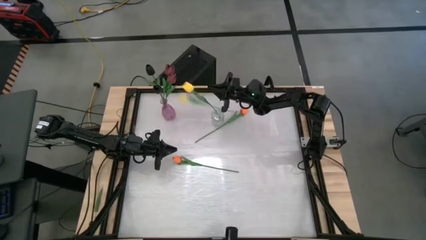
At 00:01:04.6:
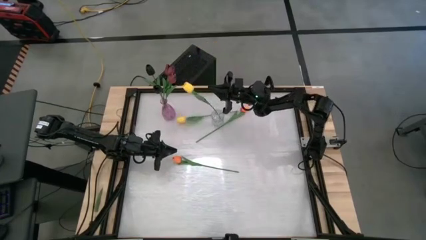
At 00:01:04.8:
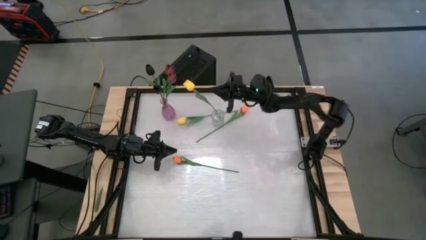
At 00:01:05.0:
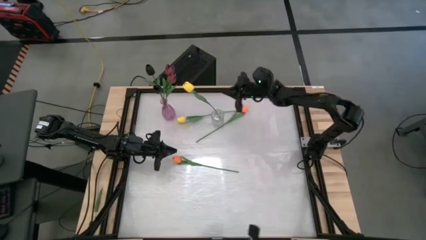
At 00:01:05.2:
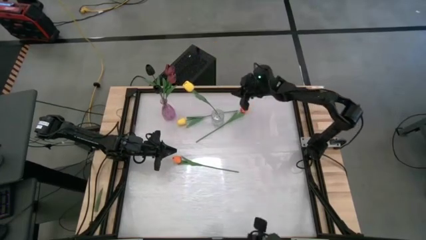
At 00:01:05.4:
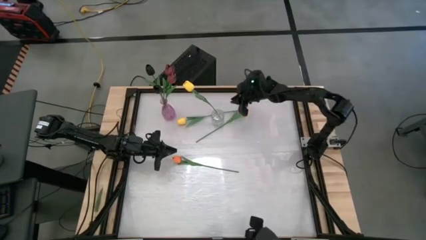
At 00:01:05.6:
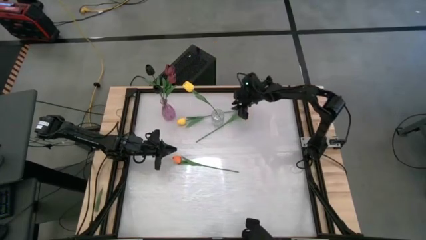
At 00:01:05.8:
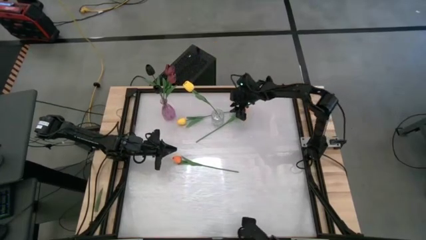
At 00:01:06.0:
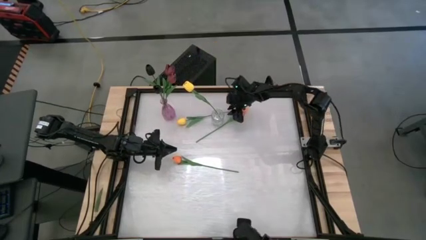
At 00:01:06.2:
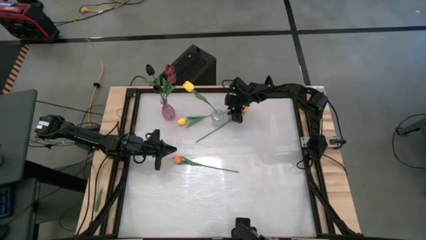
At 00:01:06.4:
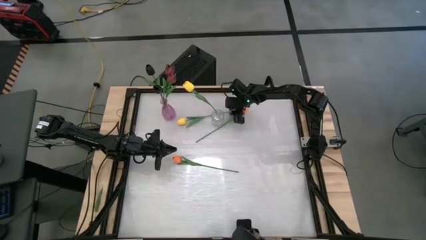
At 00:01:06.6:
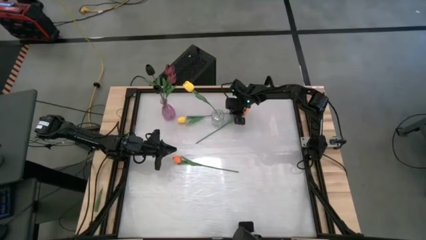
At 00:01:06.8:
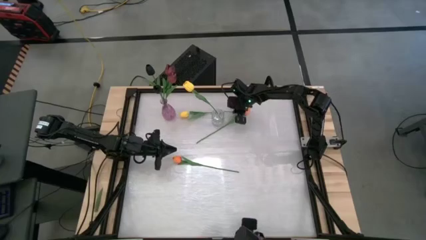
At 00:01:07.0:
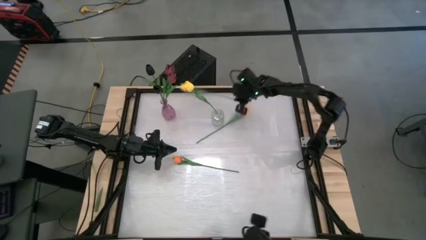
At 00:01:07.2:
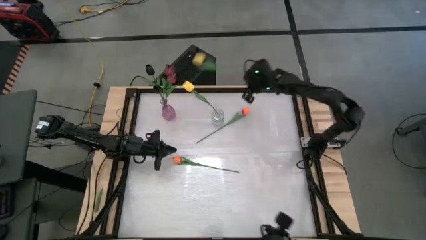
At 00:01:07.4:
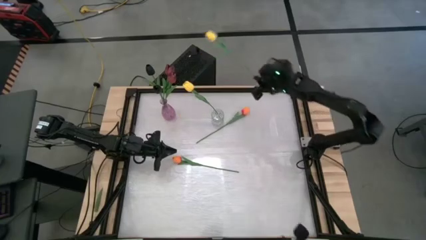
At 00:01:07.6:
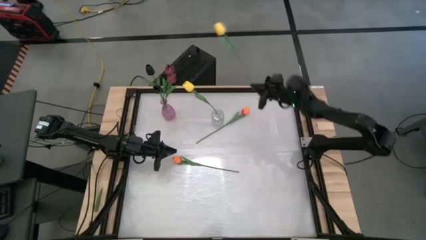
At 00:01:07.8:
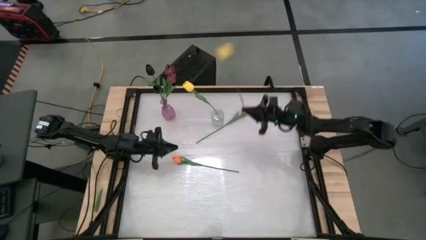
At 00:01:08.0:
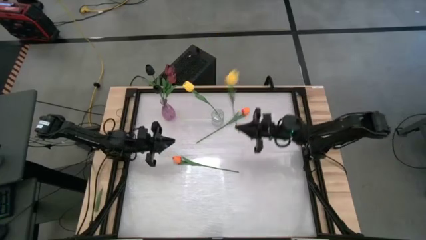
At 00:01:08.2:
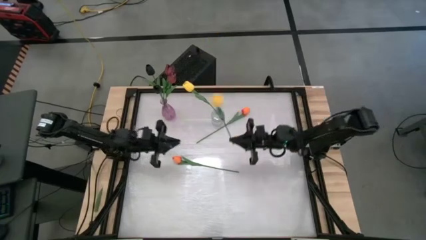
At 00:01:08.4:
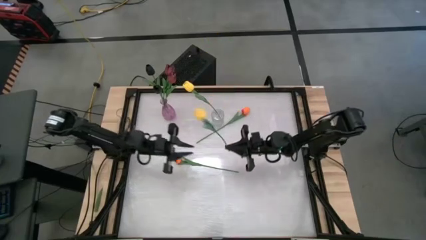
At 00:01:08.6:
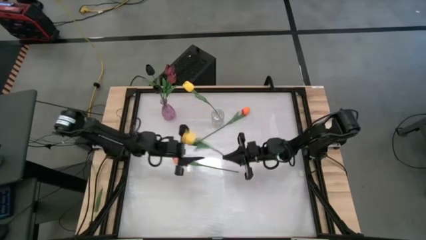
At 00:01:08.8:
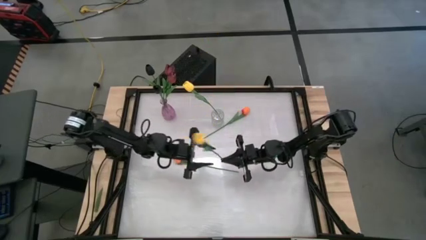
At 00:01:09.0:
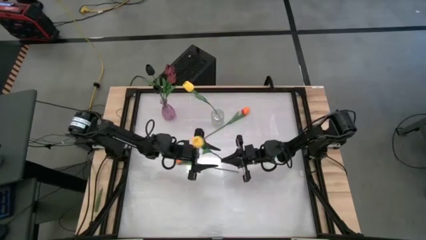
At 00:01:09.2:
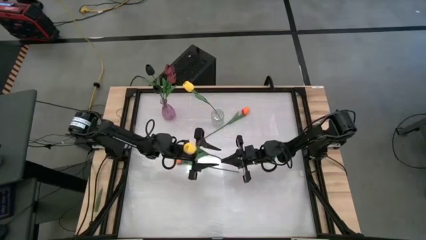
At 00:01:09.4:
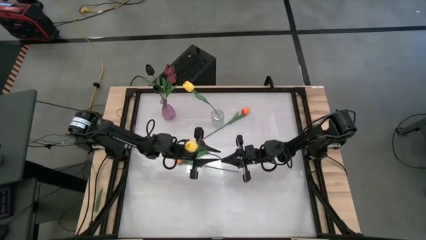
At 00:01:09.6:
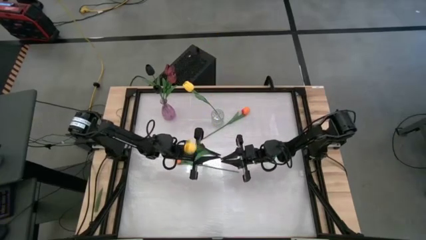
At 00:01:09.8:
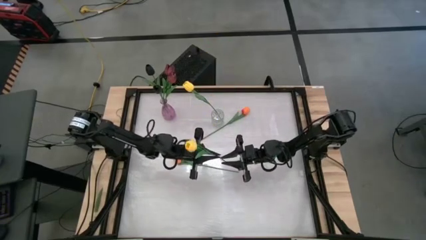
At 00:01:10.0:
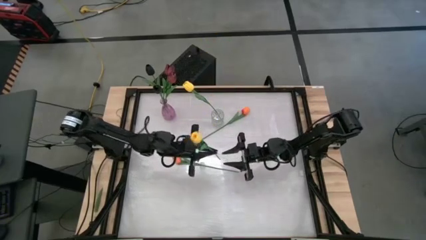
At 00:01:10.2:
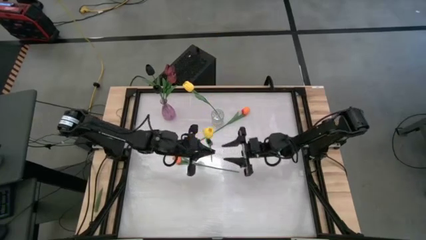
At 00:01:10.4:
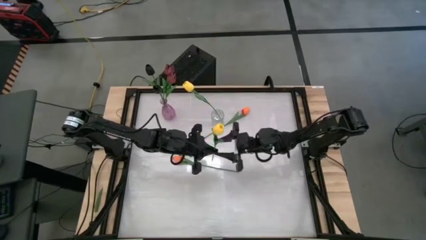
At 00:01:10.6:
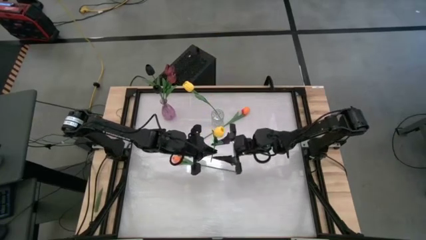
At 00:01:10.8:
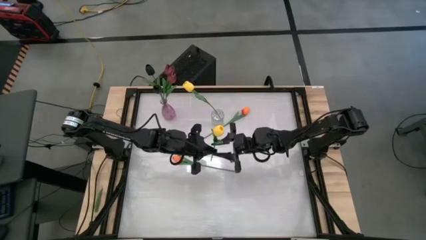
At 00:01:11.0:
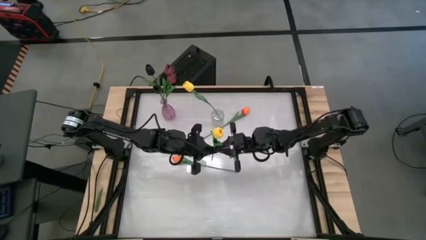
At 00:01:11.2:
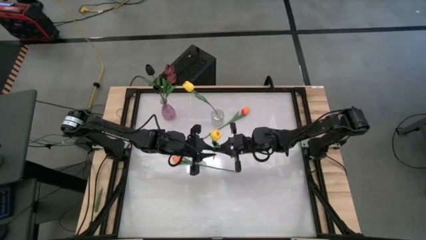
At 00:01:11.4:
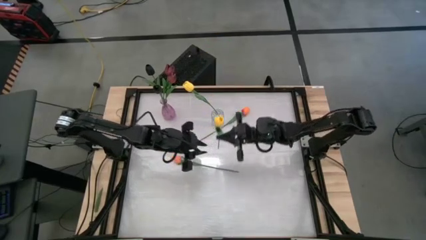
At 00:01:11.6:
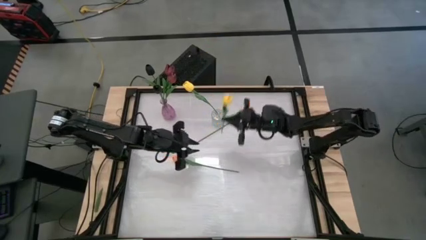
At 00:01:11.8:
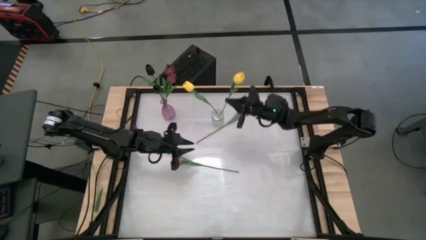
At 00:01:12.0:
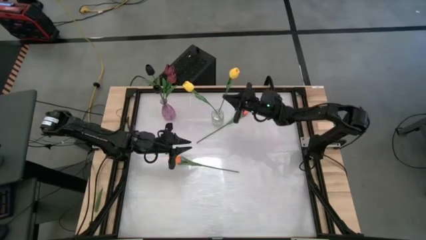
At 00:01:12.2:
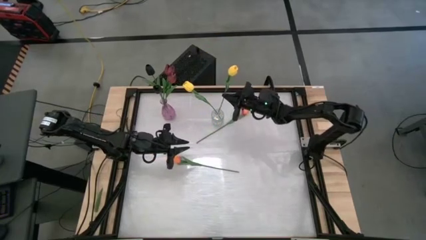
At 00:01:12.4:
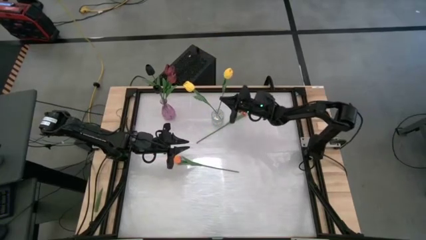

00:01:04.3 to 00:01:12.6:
Task: Sort flowers into vase by color
Put the yellow flower into the transparent vase

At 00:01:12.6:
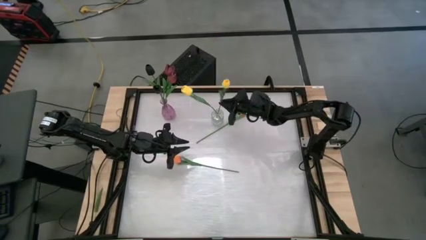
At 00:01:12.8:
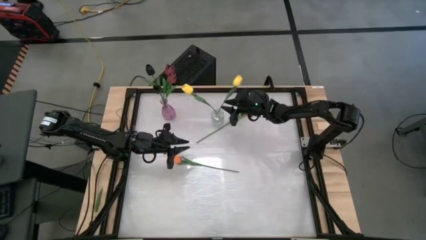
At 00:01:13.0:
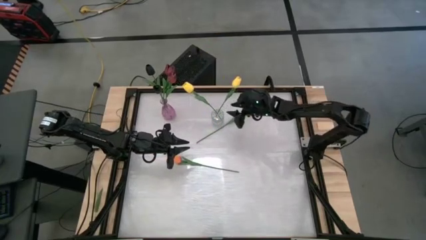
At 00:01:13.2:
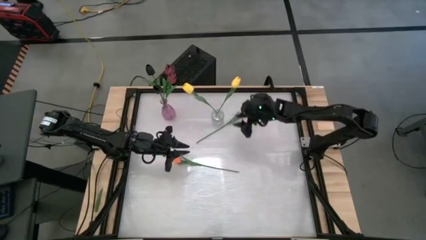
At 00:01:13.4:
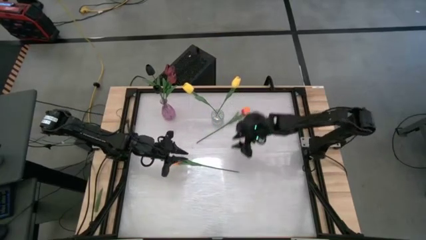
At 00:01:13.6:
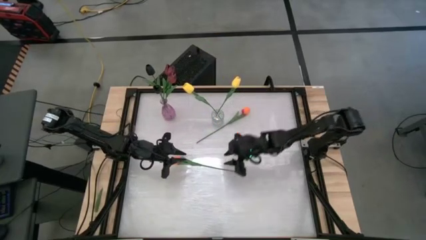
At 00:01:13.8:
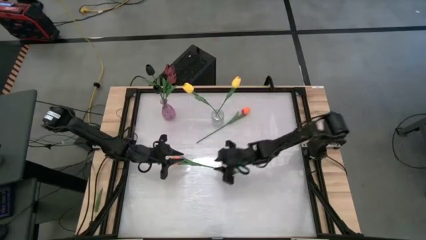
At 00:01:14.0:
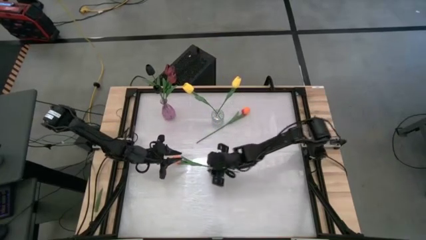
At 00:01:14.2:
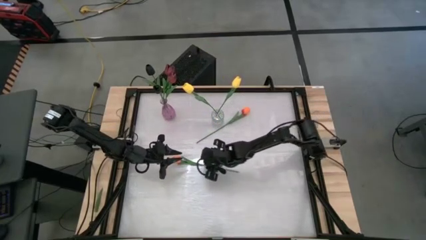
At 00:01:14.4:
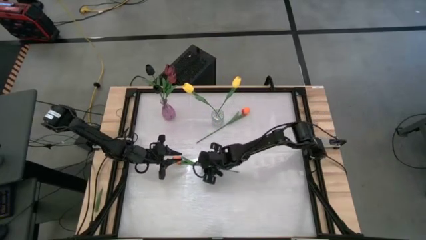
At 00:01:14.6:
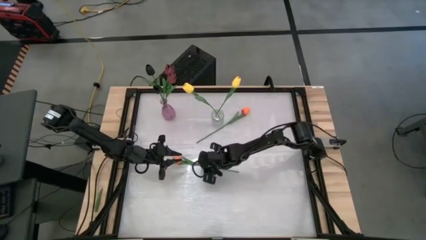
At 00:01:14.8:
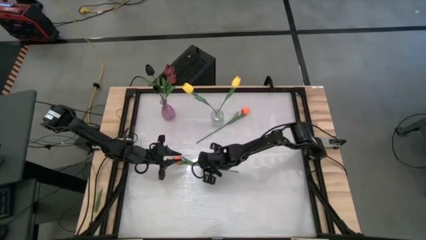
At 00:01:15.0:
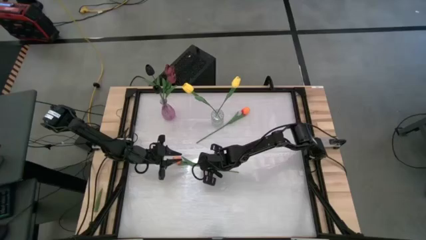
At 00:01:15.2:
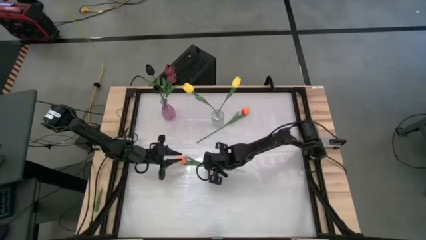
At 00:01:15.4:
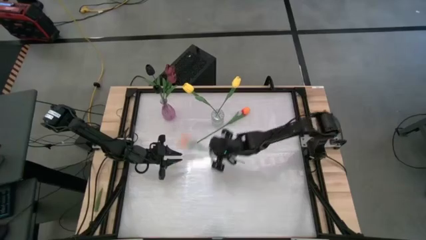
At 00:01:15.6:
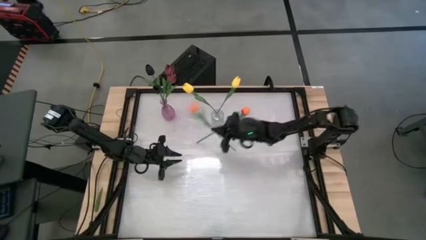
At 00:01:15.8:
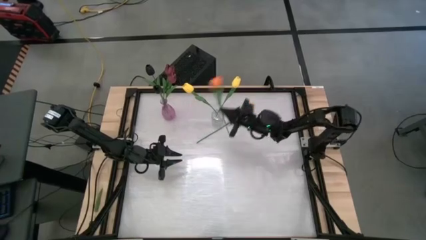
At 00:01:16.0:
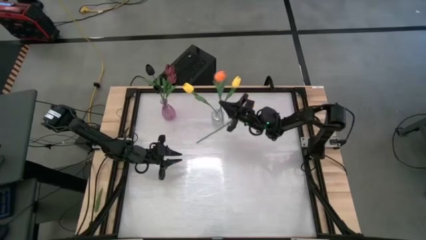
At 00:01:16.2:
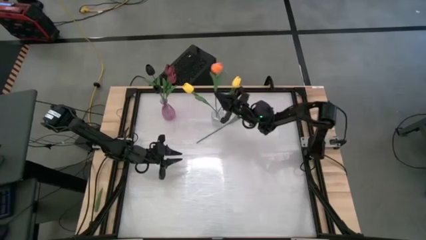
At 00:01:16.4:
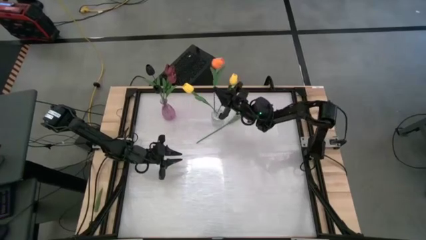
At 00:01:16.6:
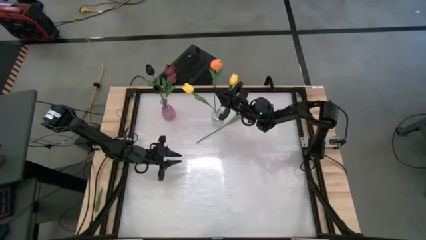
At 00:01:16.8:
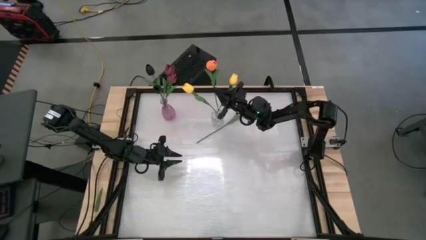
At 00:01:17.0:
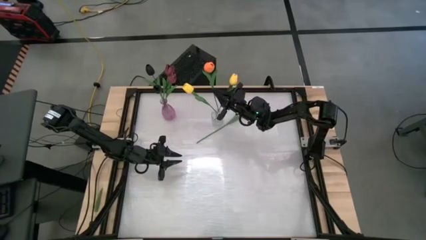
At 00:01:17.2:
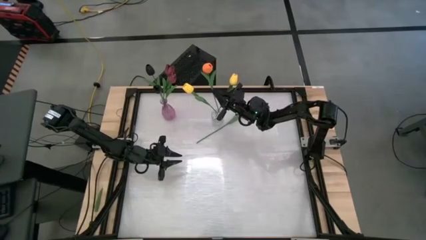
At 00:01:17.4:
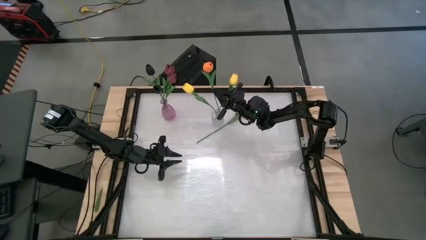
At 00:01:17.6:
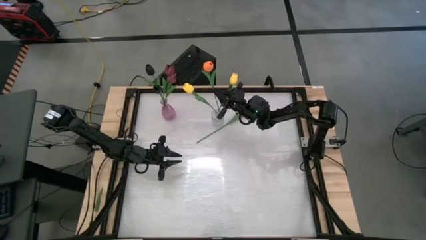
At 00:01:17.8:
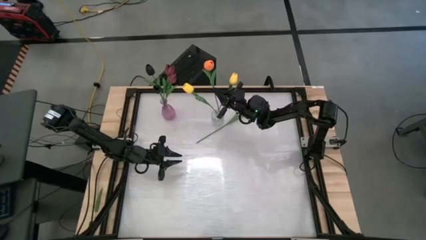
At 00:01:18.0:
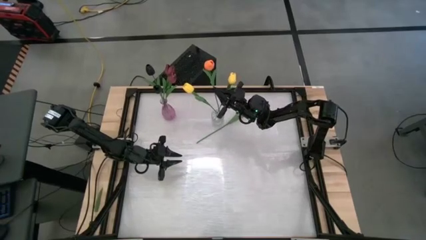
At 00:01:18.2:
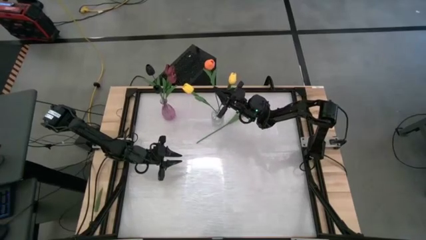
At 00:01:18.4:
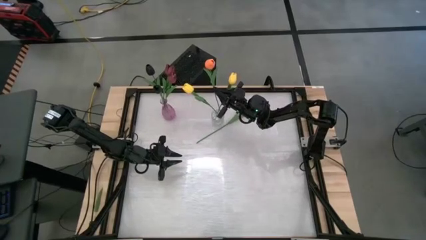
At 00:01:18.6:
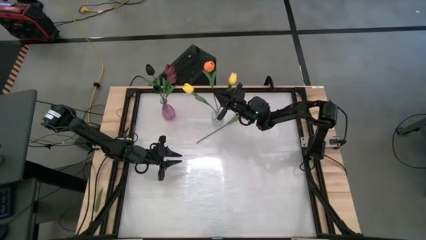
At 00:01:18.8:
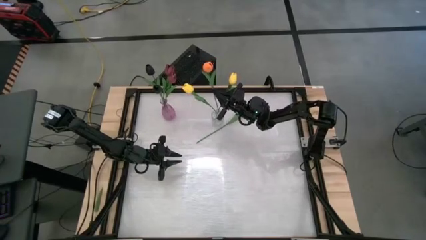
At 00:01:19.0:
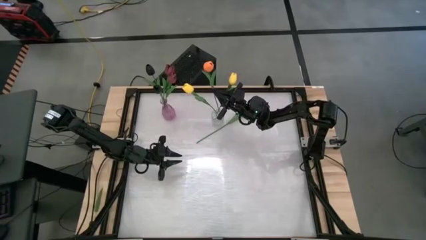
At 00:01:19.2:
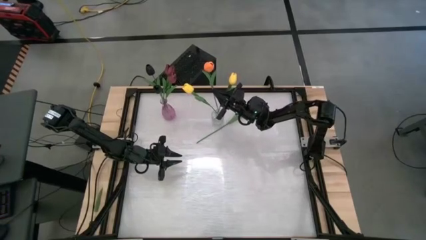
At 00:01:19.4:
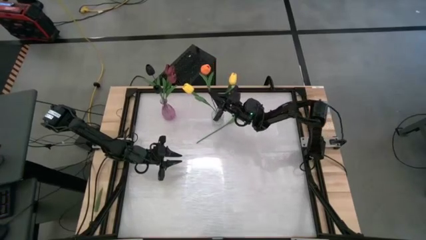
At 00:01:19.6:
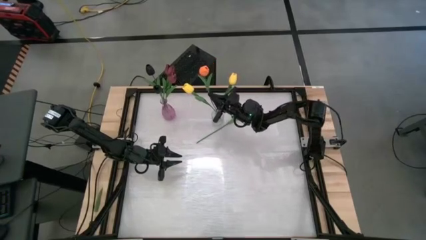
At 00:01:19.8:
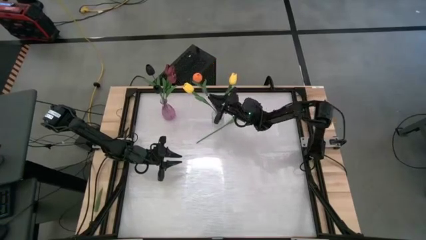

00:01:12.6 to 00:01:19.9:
Put the bottom orange flower into the transparent vase

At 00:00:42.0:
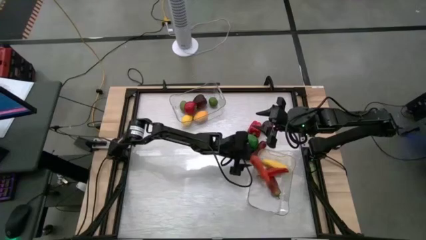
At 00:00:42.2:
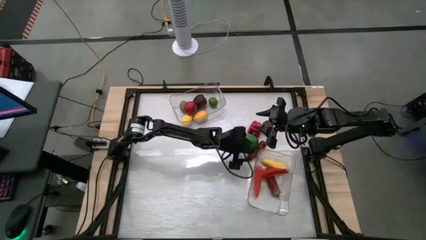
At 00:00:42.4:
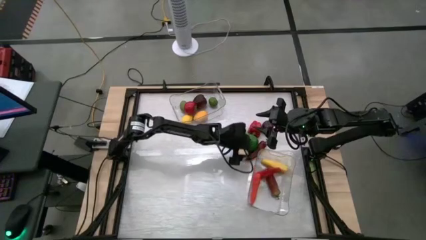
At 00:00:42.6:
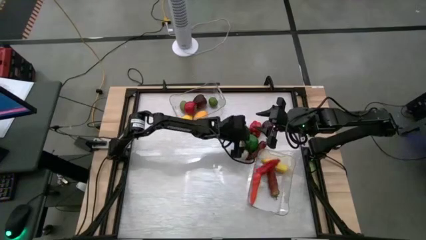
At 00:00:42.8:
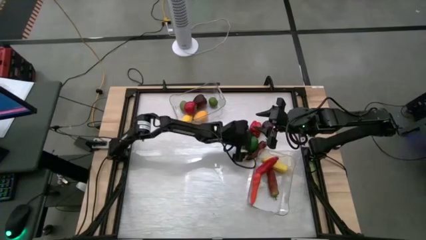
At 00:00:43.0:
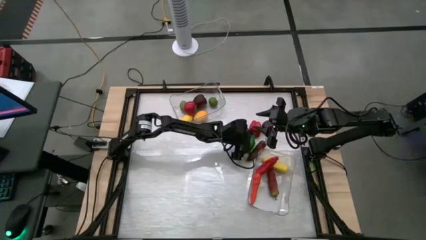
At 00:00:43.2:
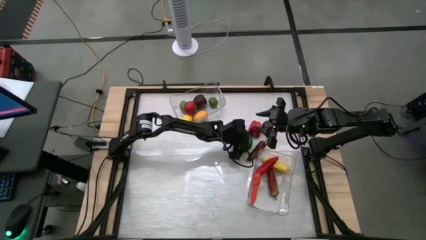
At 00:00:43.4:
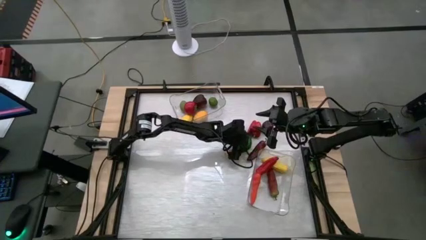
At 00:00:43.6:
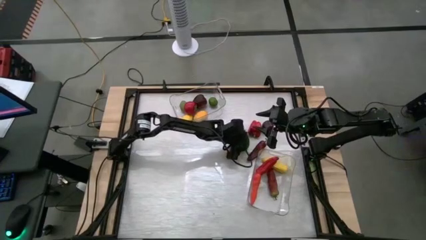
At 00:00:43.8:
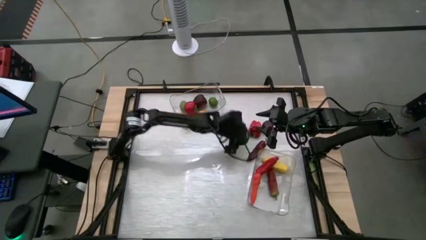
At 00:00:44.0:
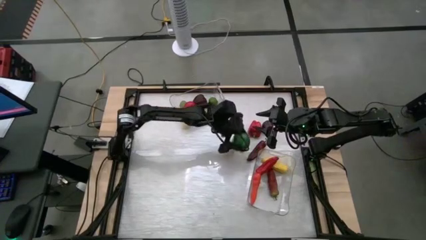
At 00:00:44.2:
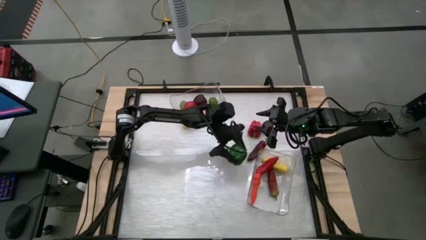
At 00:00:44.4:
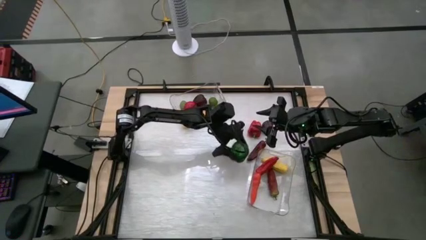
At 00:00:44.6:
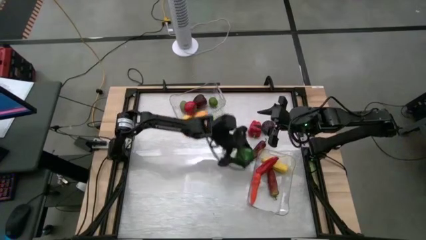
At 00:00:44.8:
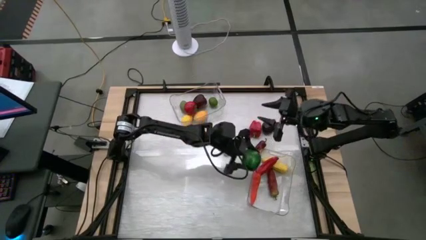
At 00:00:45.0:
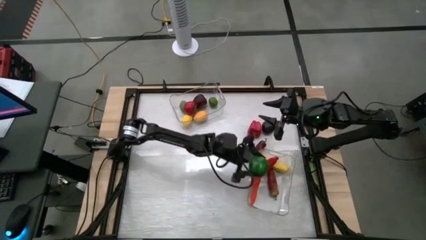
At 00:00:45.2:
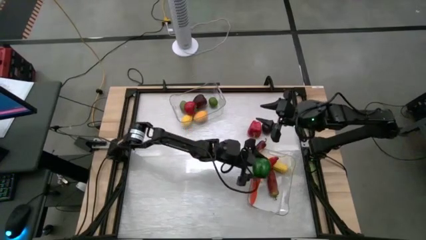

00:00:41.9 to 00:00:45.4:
Task: Sort produce into baskets
Put the green bell pepper into the bottom transparent bin
